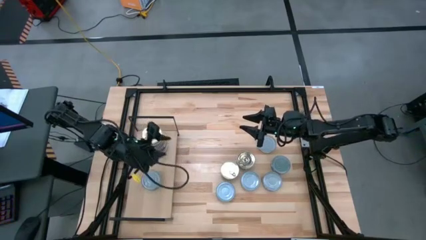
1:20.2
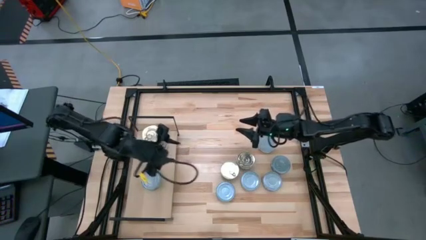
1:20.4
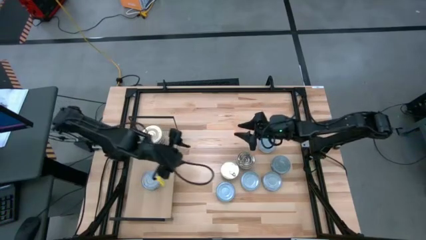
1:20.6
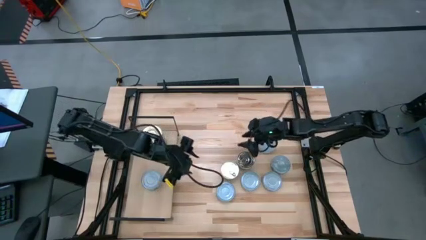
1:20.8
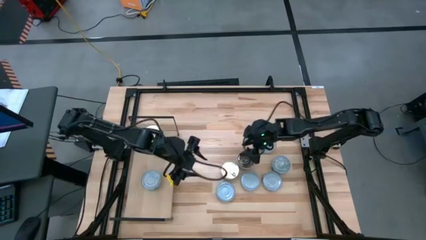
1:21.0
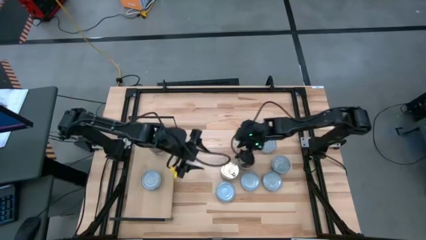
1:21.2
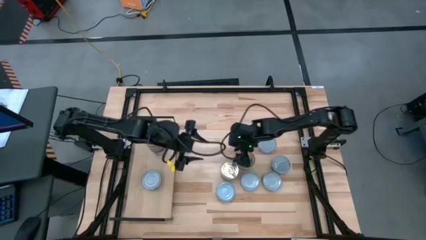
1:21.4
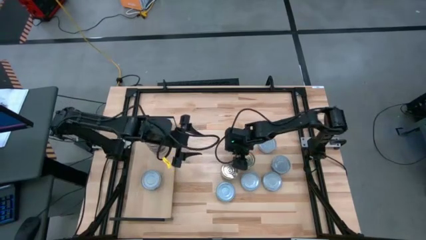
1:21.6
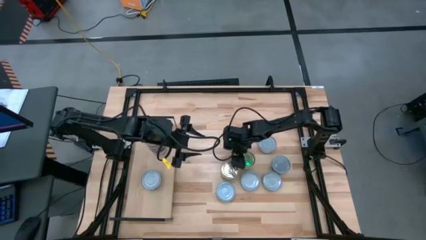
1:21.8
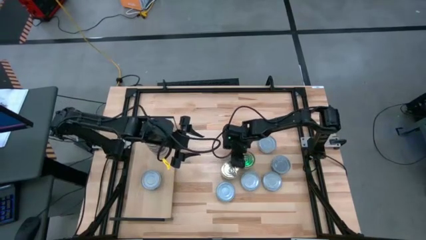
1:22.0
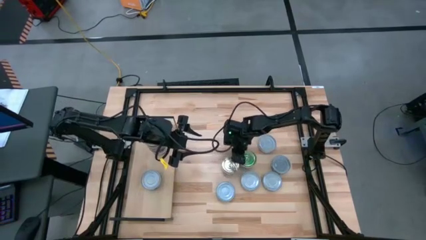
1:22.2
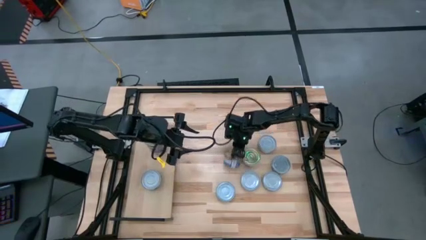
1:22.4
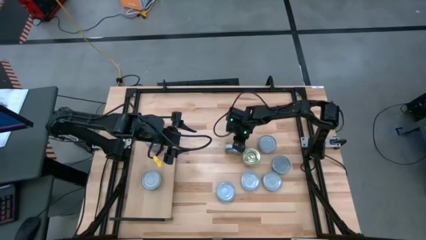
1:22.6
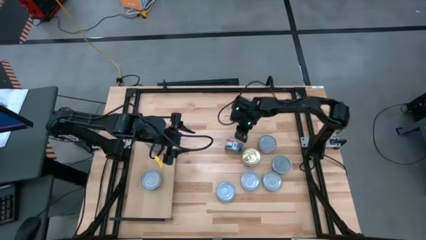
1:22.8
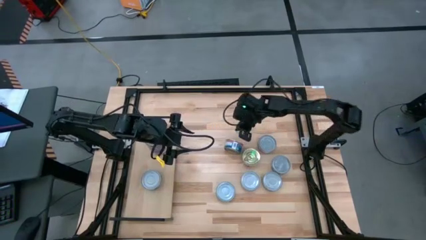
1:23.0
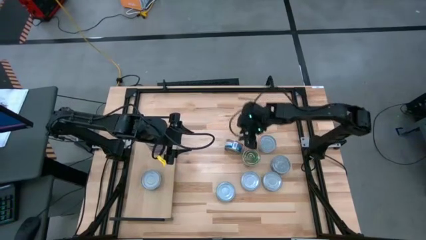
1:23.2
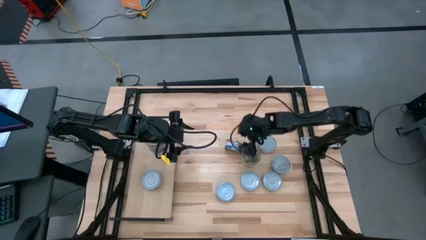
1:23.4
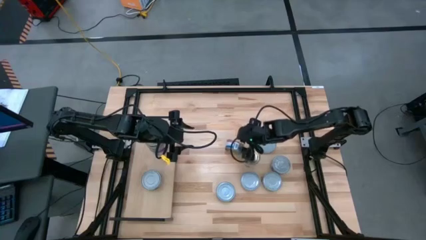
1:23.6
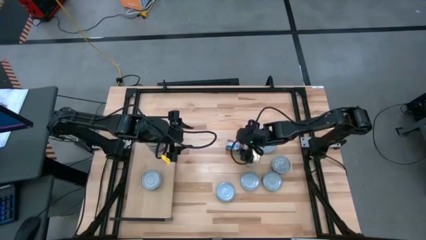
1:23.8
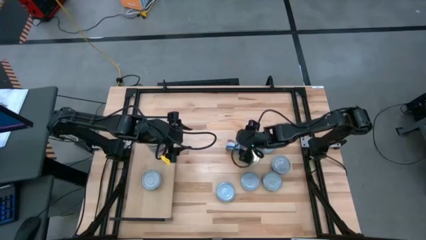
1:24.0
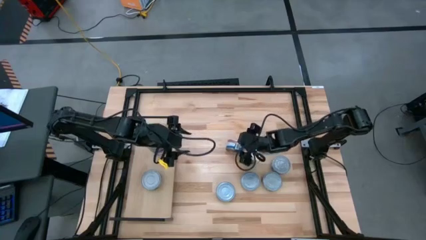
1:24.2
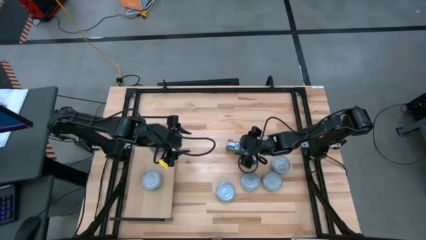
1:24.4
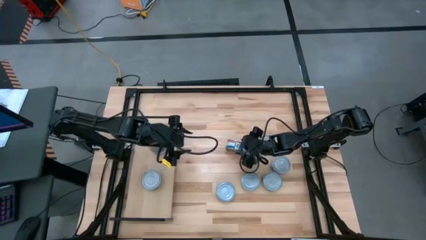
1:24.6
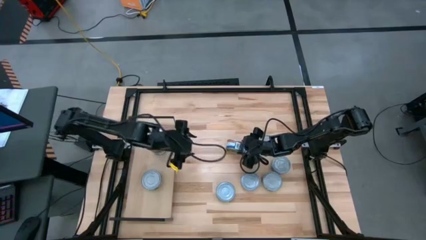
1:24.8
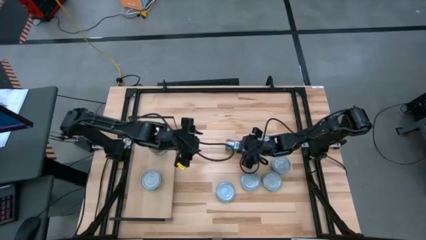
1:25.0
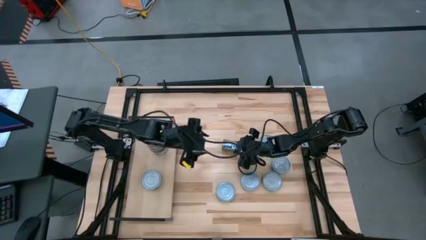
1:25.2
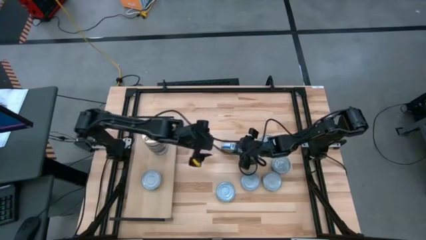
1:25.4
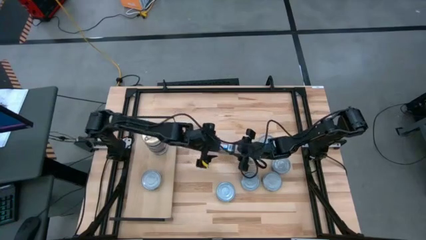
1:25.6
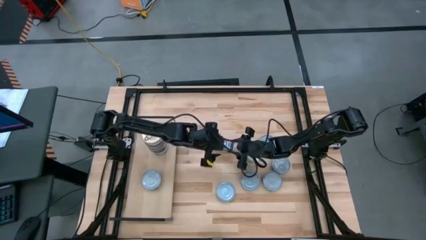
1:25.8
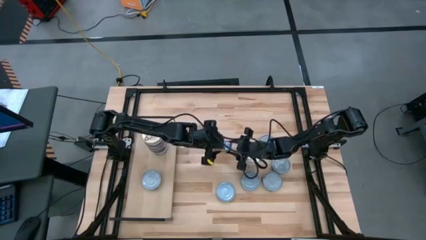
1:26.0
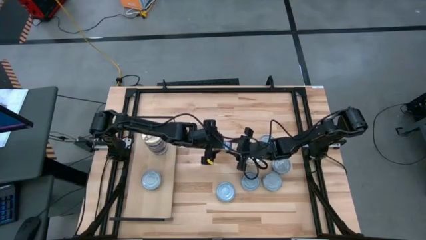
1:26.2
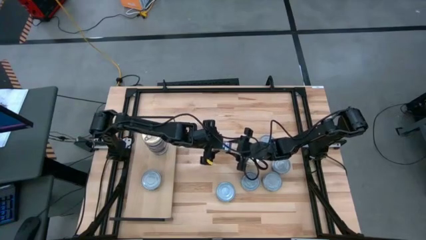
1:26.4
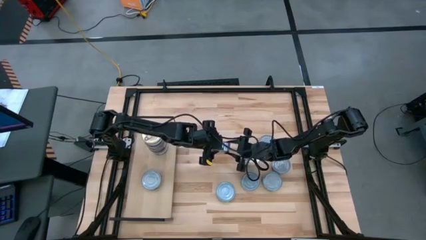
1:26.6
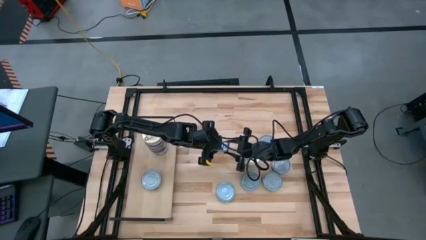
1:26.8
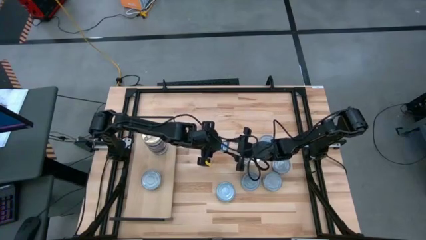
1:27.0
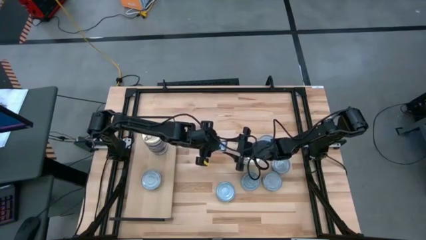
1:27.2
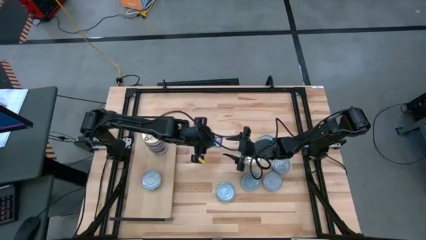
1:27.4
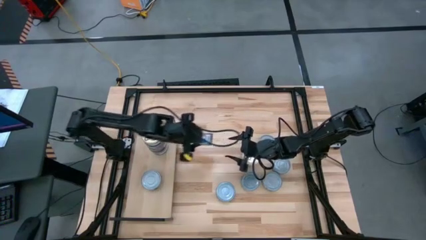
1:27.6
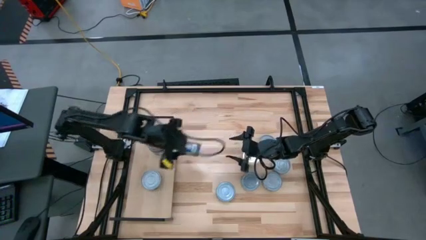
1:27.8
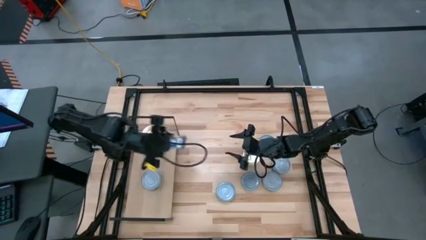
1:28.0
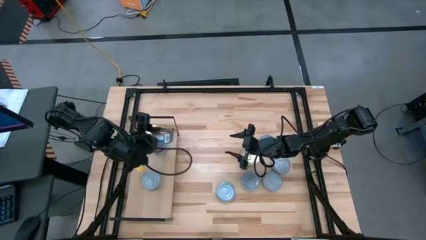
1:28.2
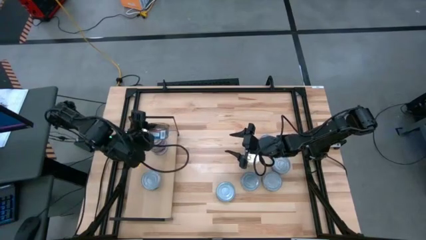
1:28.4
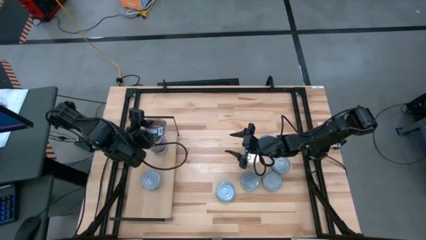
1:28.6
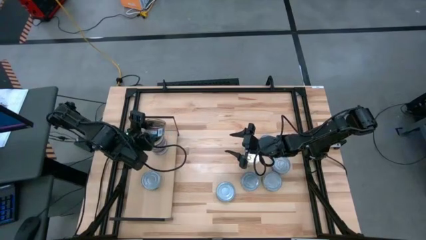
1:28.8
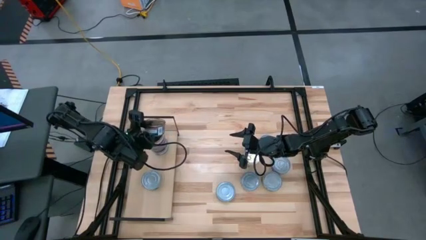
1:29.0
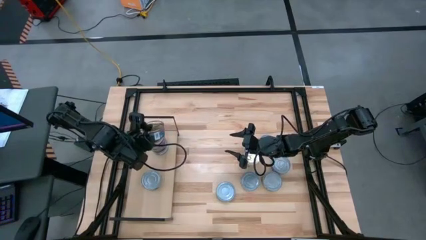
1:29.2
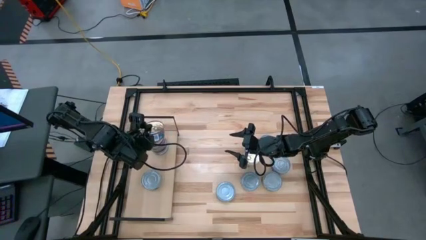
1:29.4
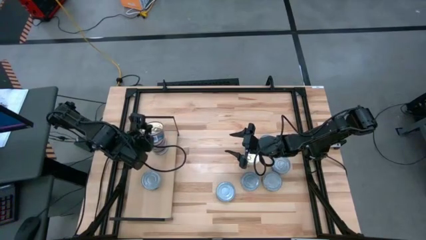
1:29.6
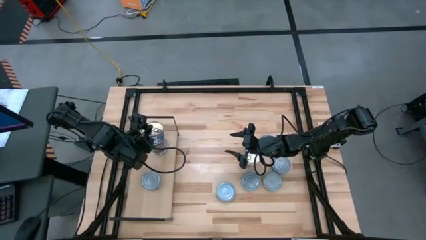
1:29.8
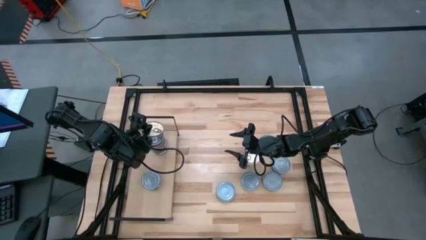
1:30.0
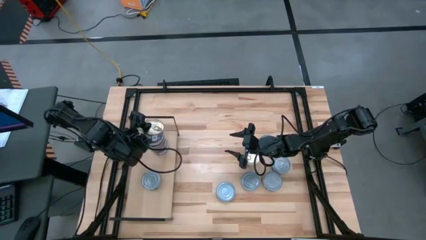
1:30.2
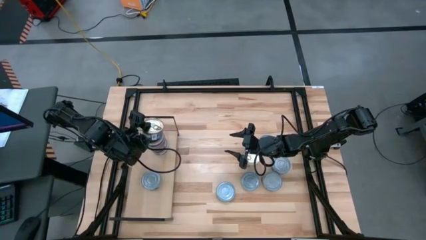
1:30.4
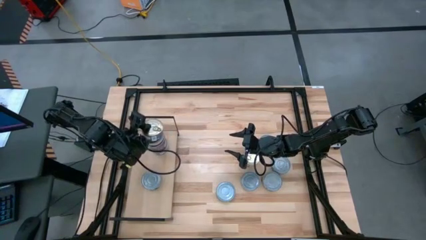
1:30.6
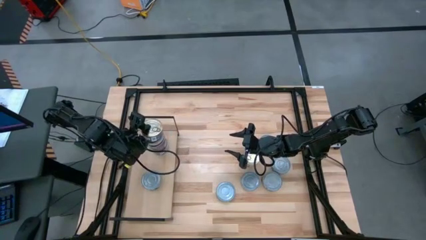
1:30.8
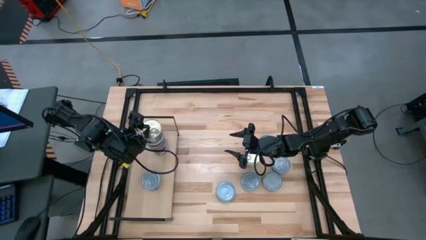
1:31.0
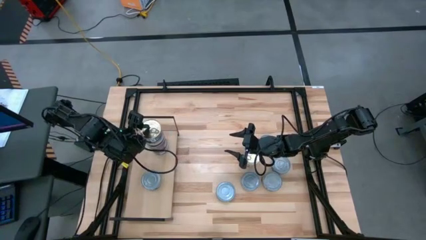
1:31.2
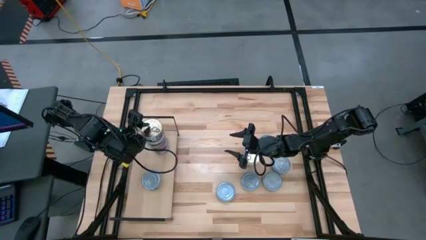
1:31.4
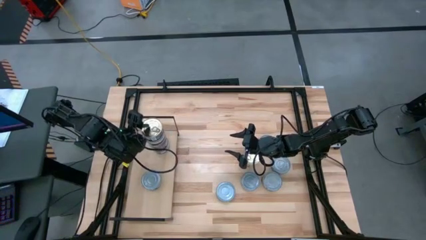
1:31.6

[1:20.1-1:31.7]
Task: Stack canned seafood by type on shelf
Stack the left blue and pink tuna can on the blue and pink tuna can on the shelf
